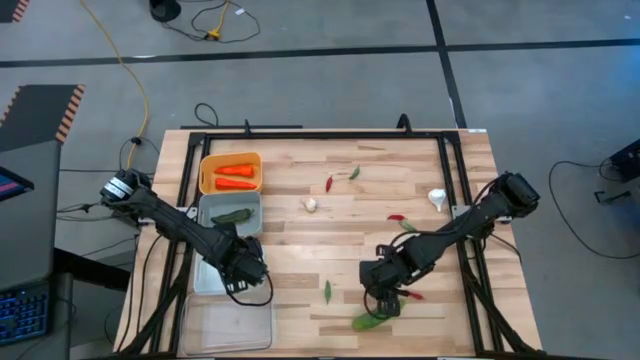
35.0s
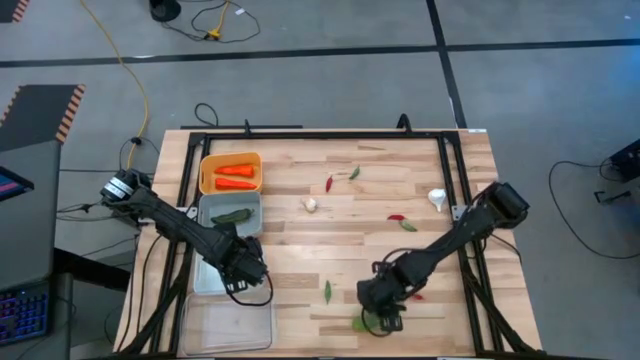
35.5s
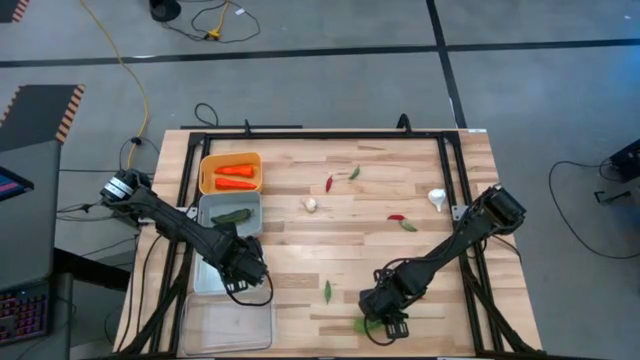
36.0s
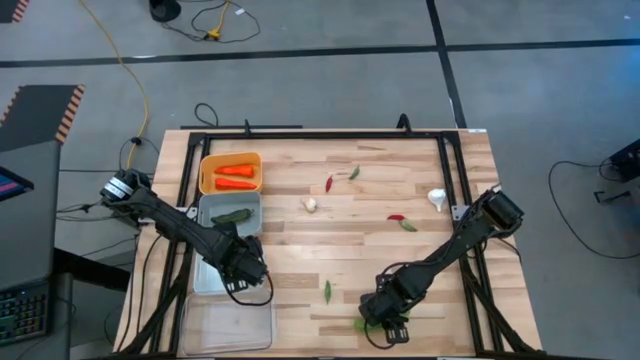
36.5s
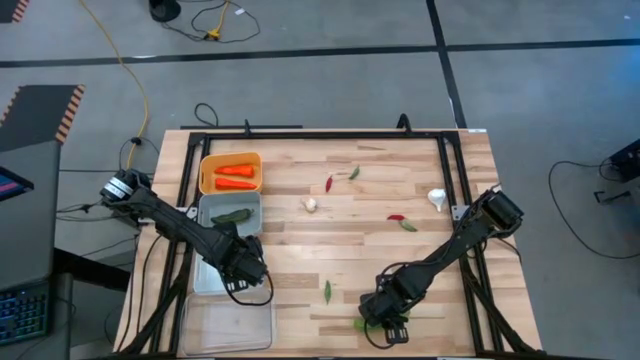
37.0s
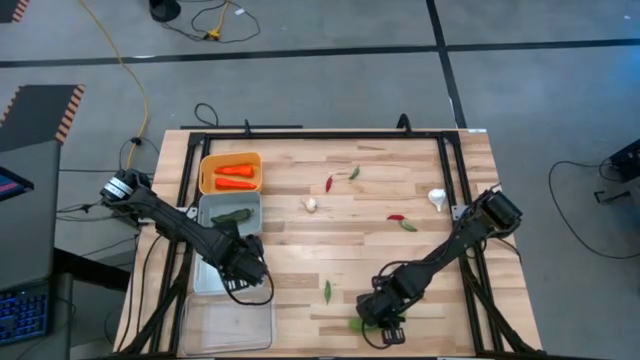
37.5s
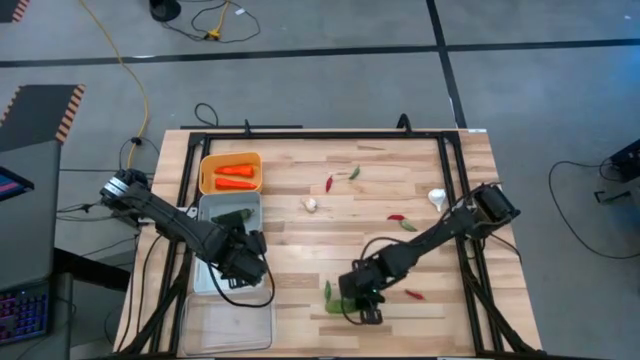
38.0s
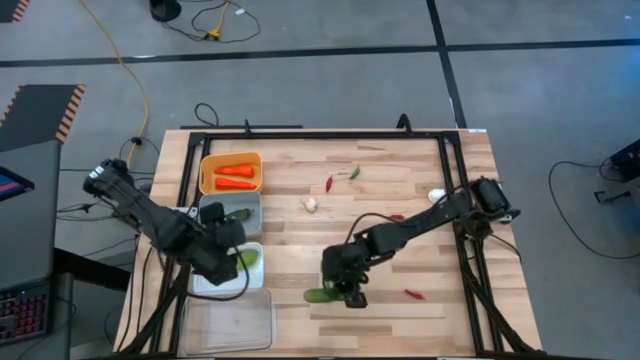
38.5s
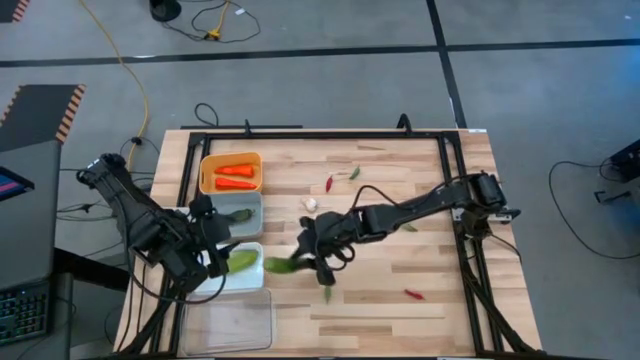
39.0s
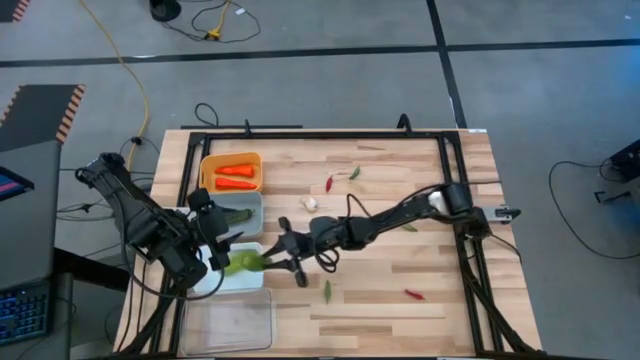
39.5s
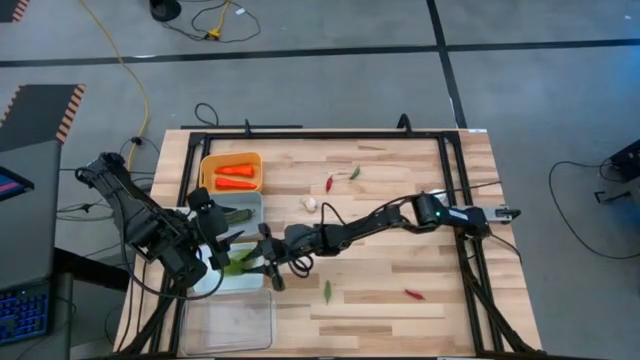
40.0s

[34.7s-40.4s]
Task: Sort produce into baskets
Put the cucumber into the white bin

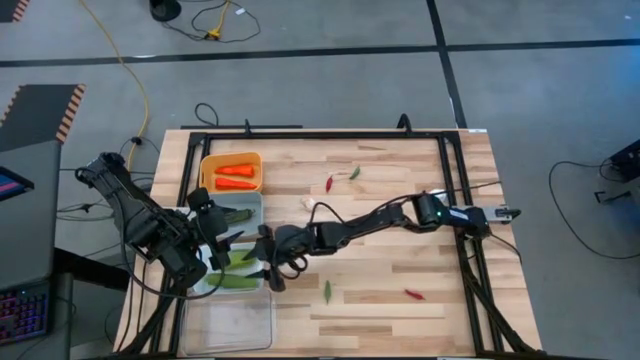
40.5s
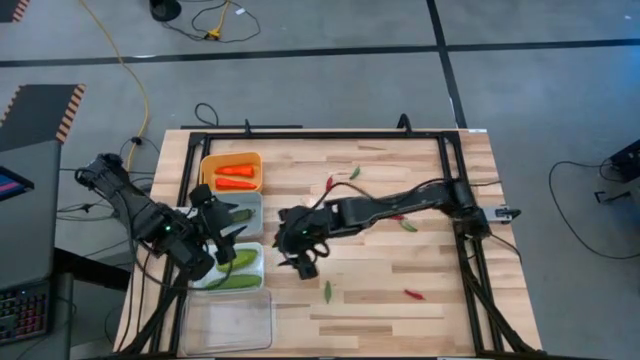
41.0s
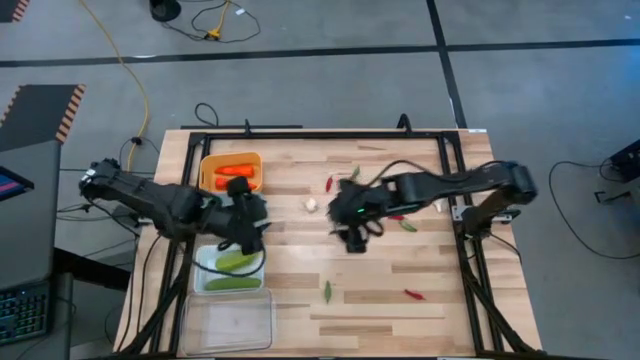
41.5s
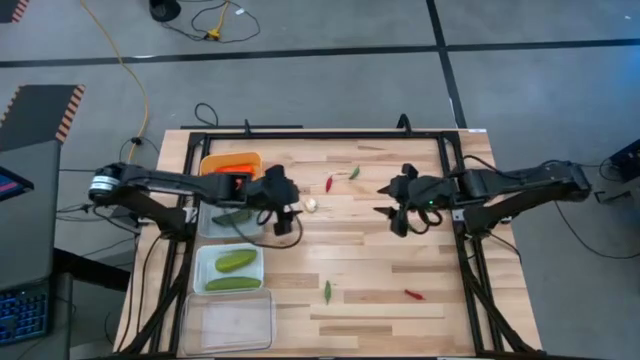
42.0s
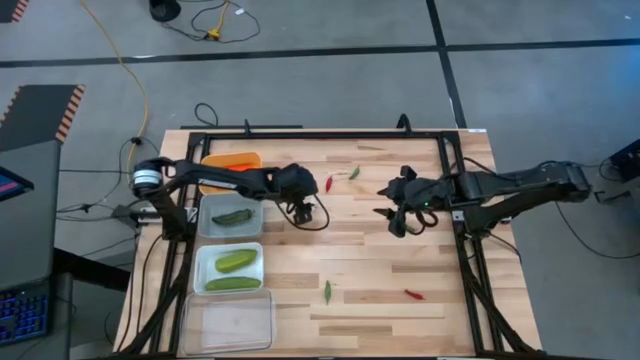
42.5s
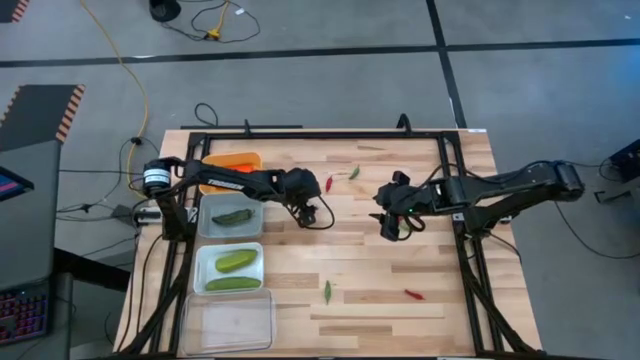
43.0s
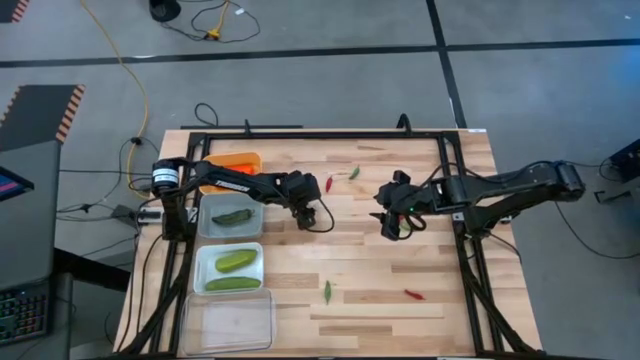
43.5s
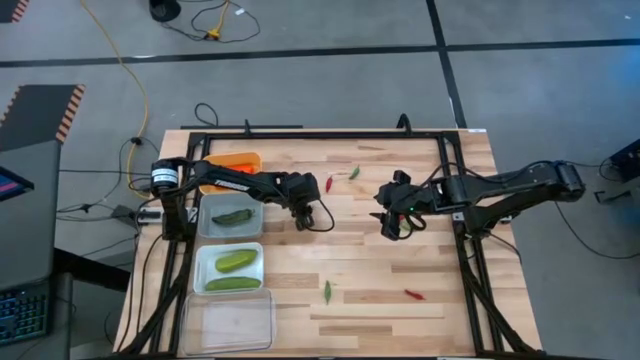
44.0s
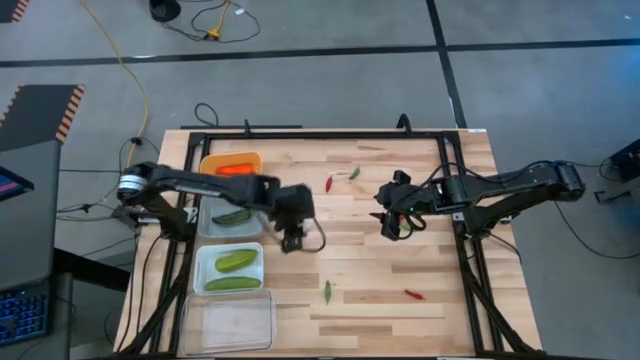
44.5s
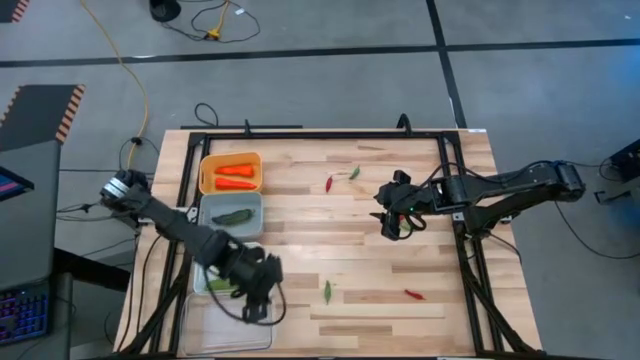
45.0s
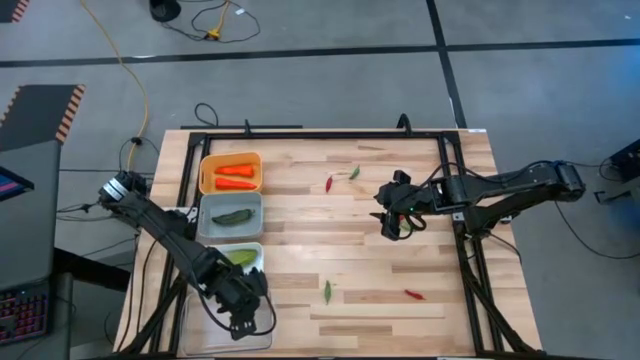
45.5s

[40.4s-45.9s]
Put the left garlic into the transparent bin

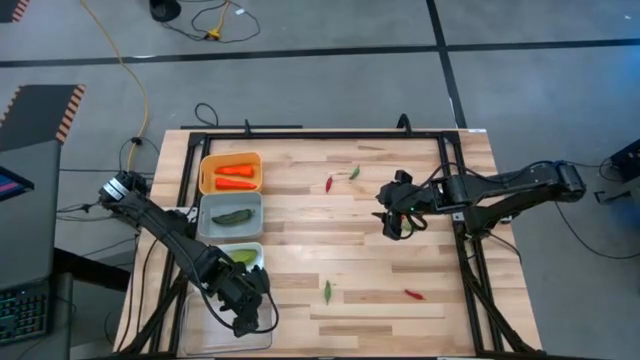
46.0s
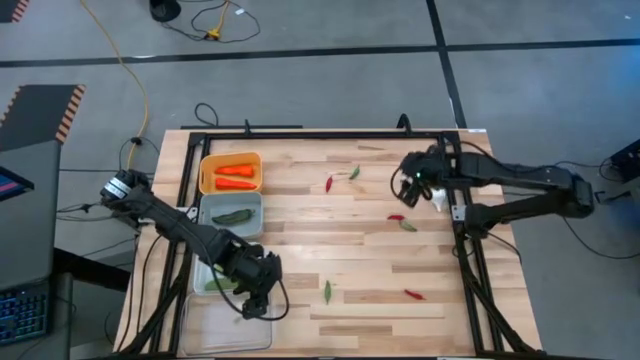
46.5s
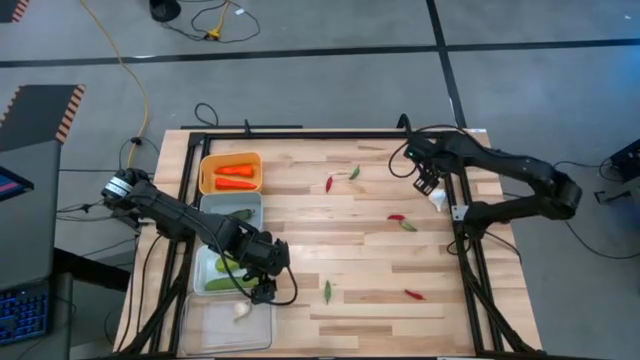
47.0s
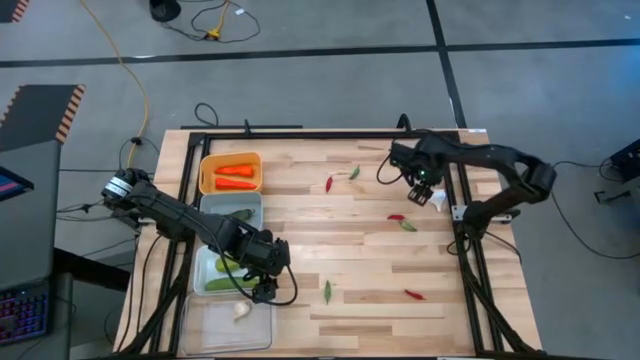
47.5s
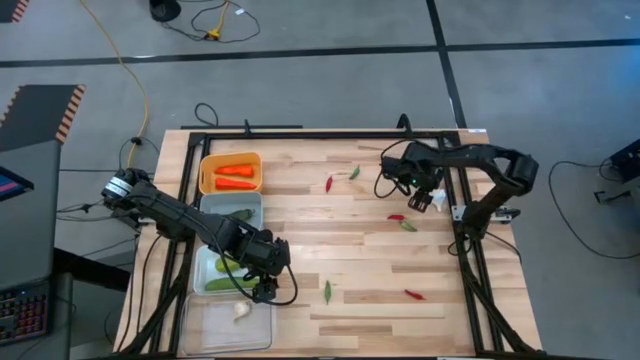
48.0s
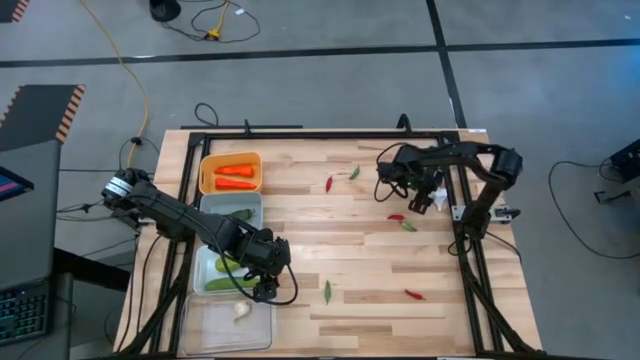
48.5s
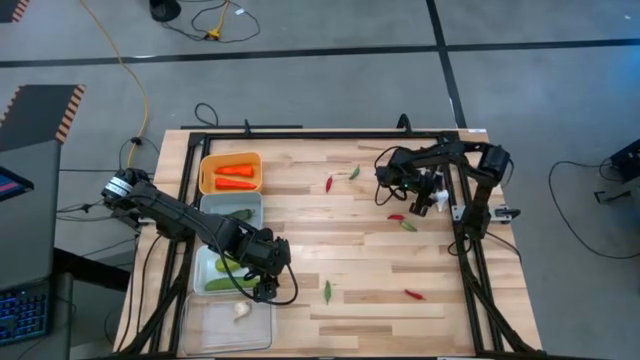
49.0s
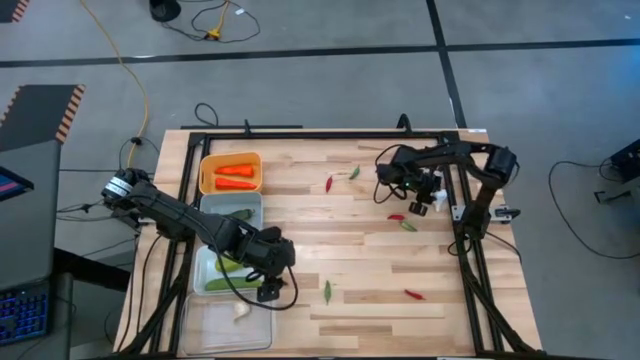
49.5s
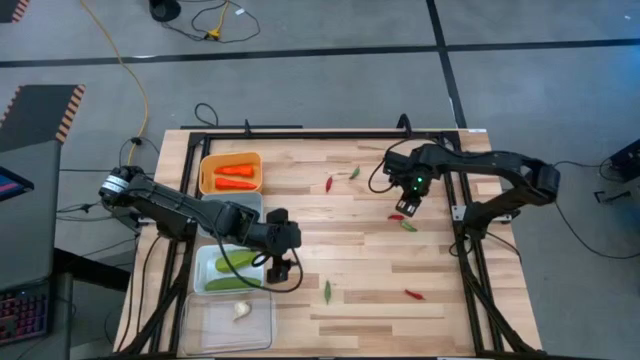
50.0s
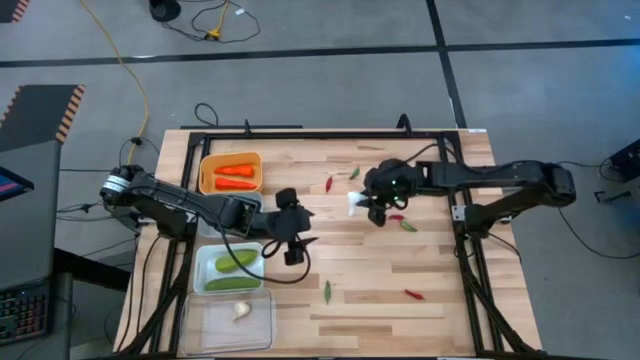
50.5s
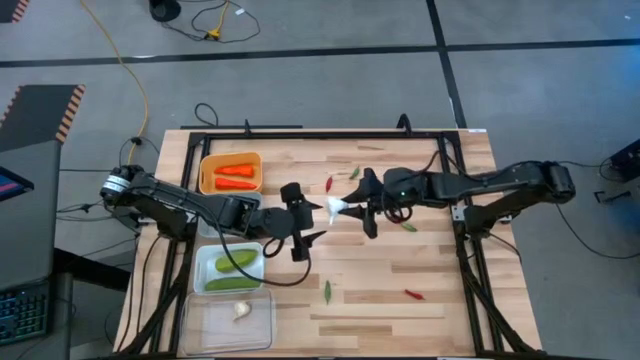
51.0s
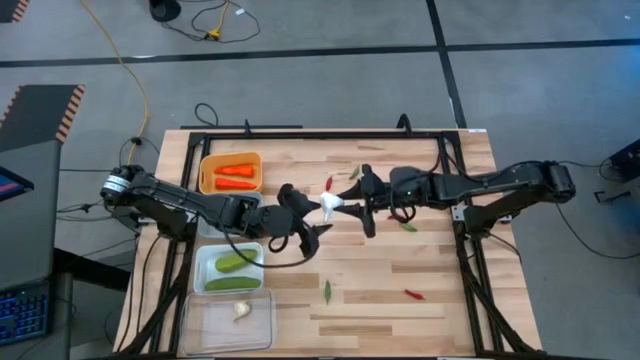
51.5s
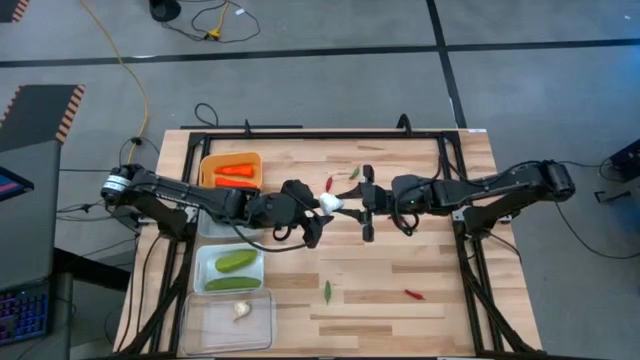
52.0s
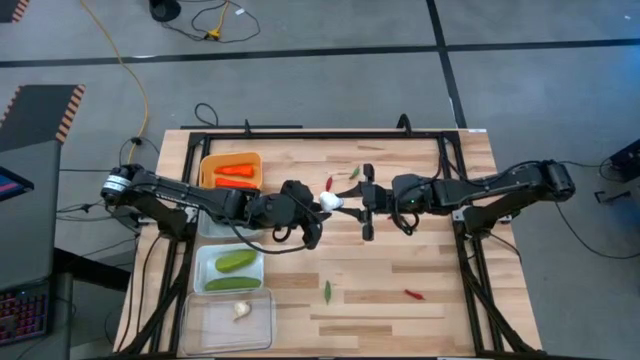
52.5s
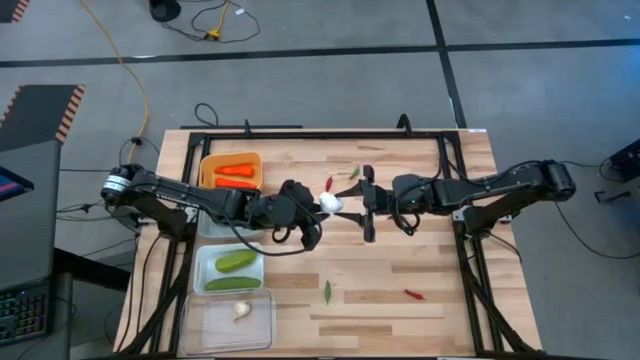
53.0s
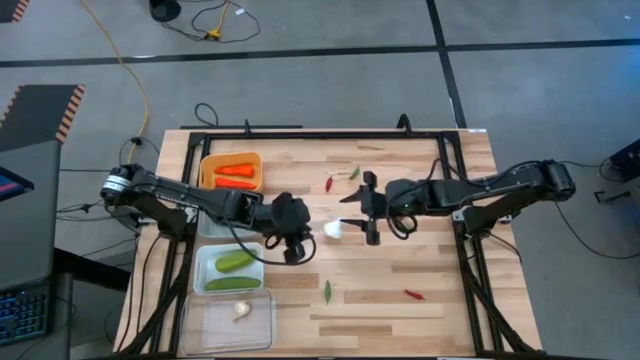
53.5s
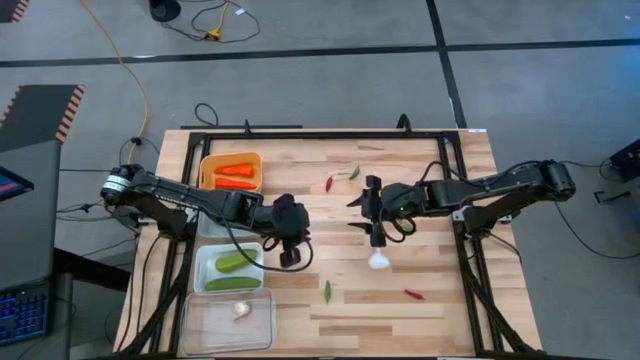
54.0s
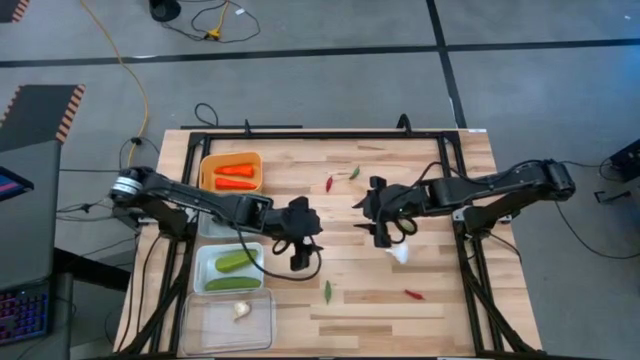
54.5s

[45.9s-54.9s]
Put the garlic into the transparent bin

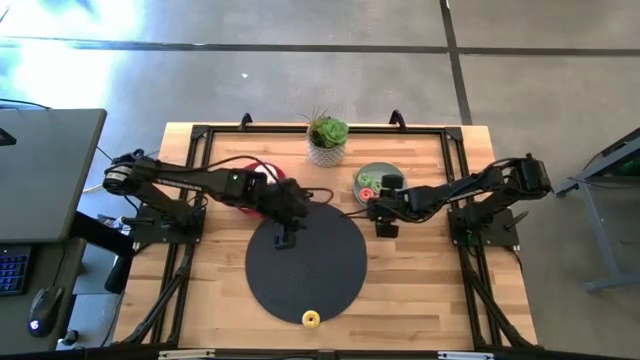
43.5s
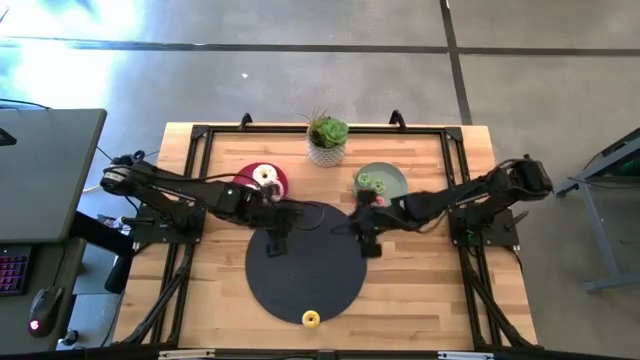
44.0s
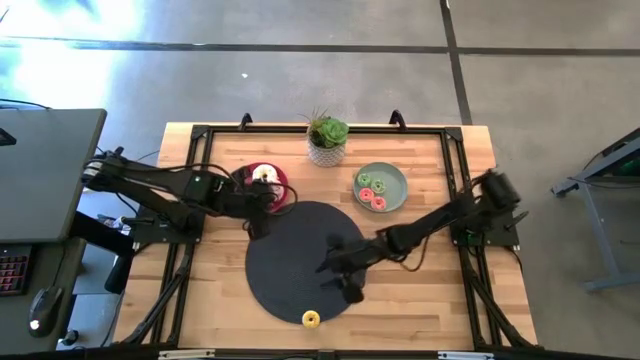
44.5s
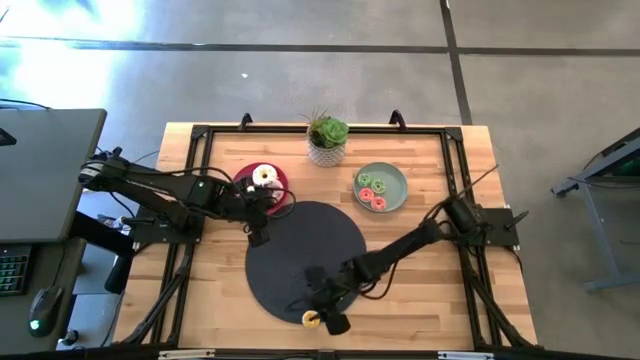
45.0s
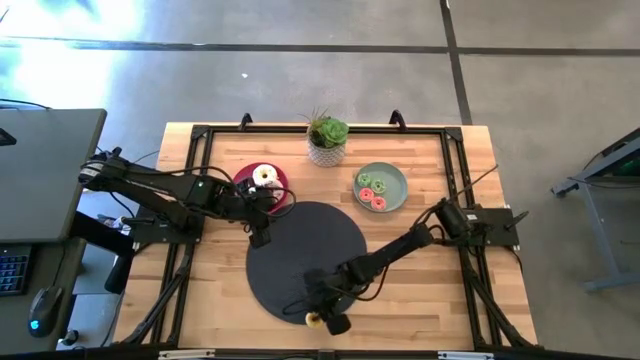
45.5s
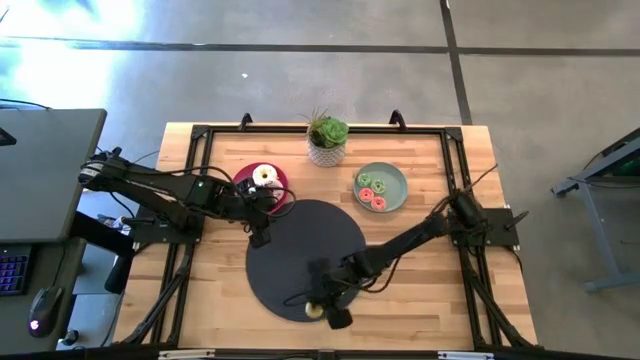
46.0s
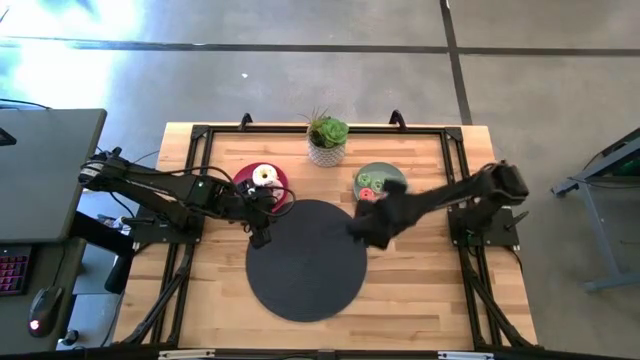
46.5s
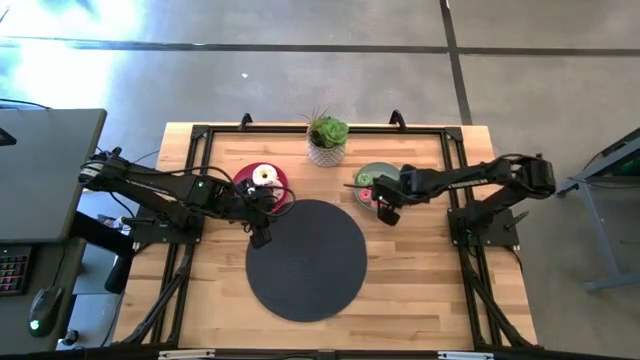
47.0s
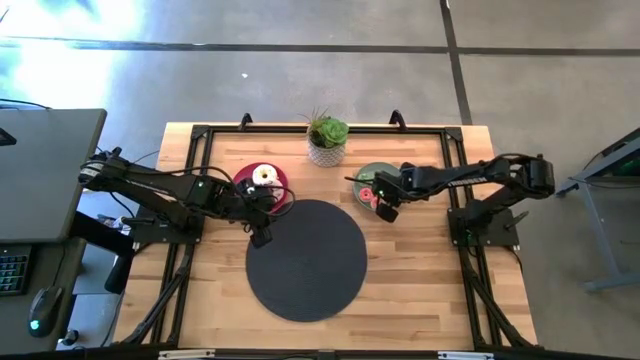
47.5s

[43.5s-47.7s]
Task: Pick & Place donuts
Put the small yellow donut on the gray plate
